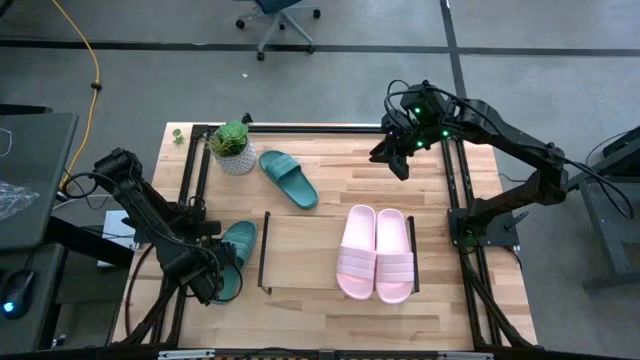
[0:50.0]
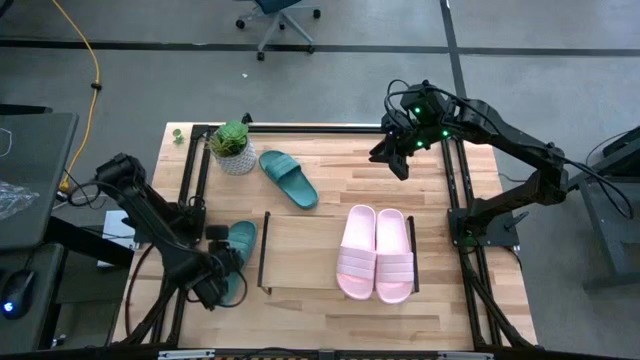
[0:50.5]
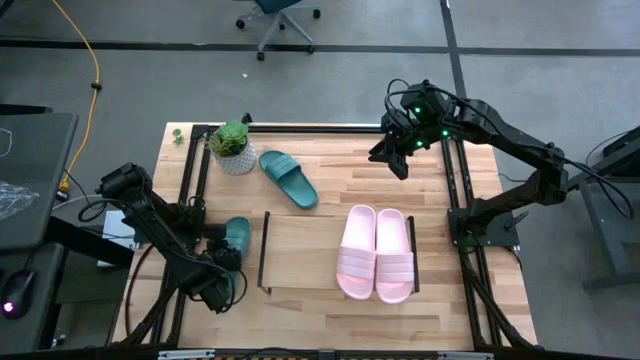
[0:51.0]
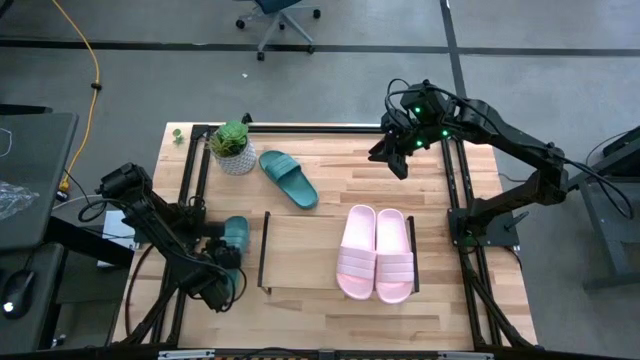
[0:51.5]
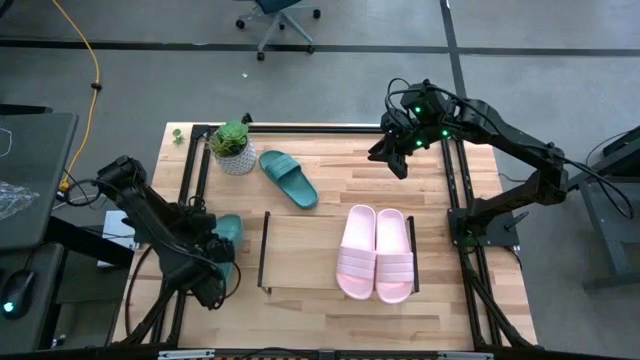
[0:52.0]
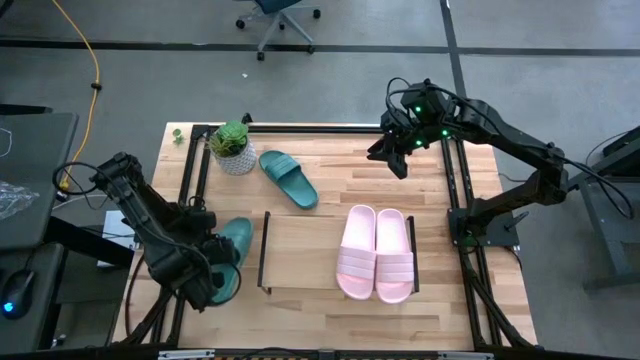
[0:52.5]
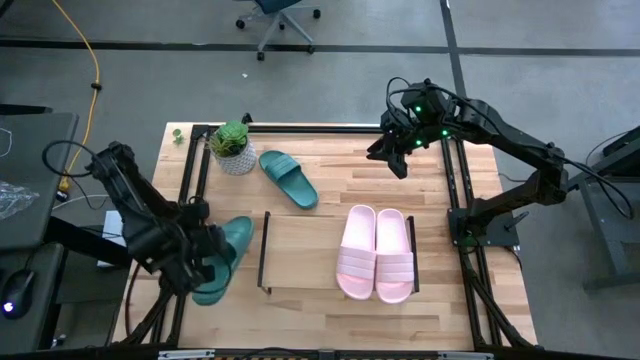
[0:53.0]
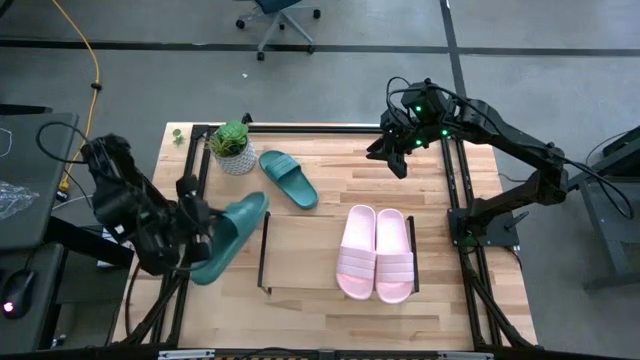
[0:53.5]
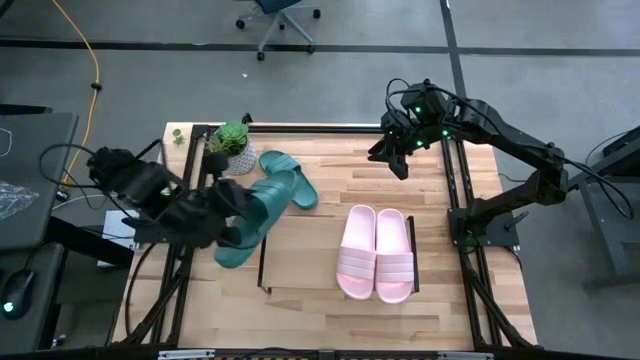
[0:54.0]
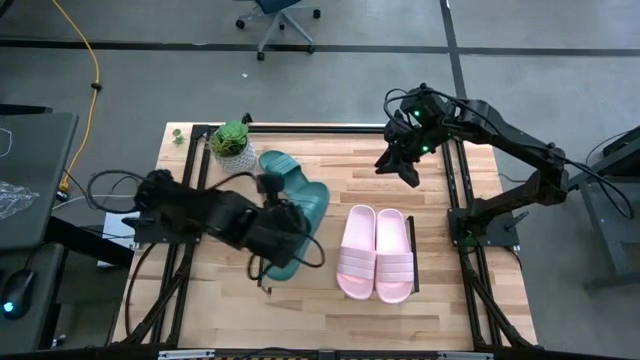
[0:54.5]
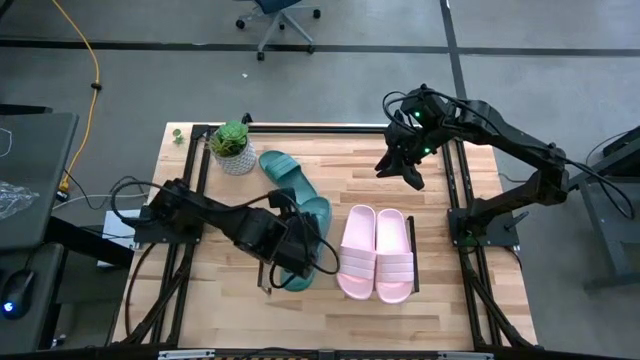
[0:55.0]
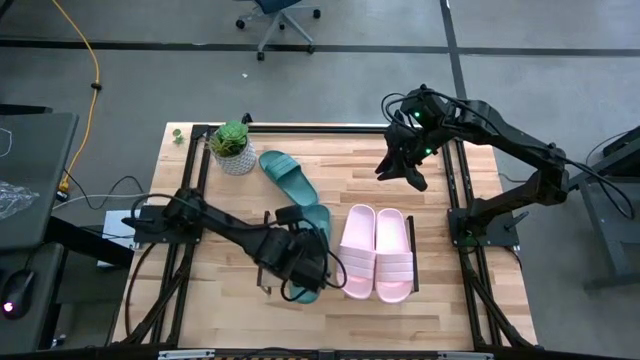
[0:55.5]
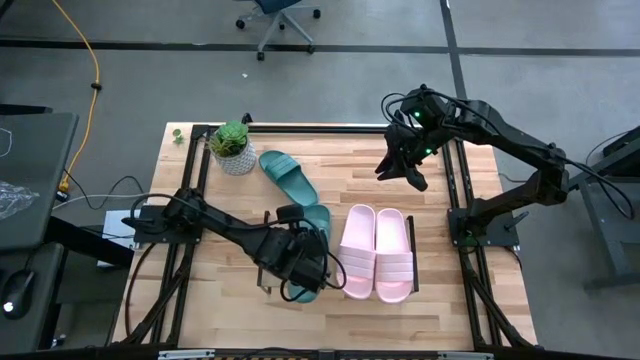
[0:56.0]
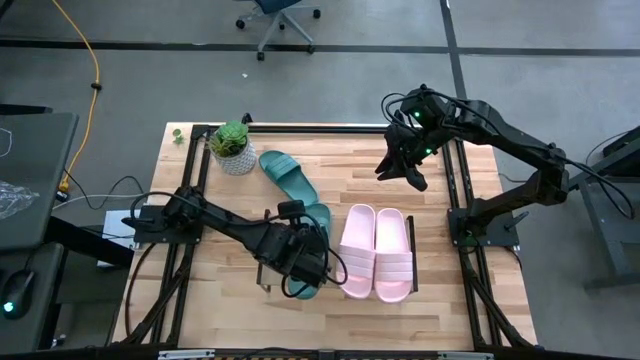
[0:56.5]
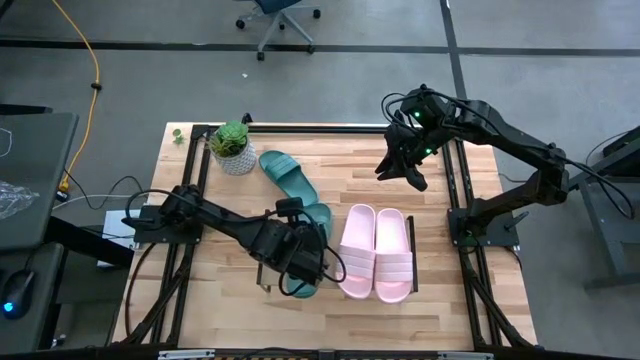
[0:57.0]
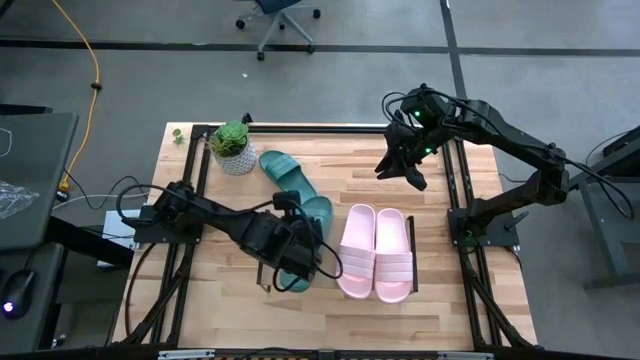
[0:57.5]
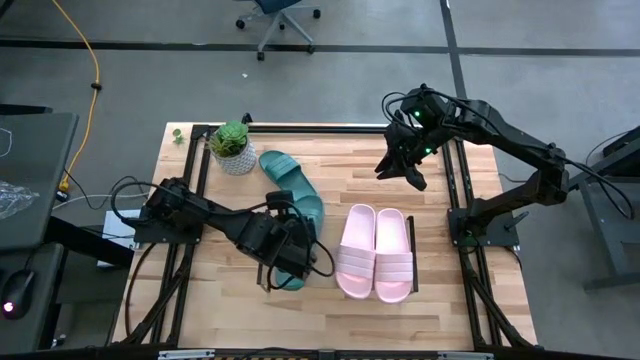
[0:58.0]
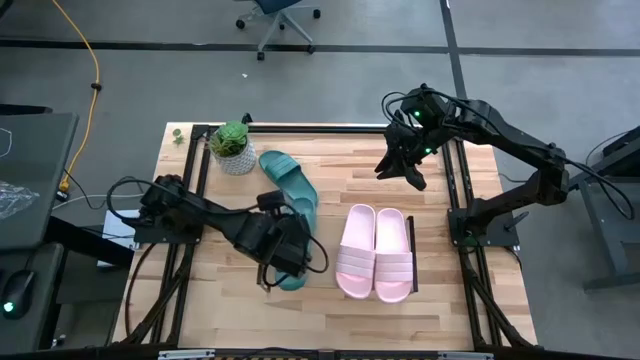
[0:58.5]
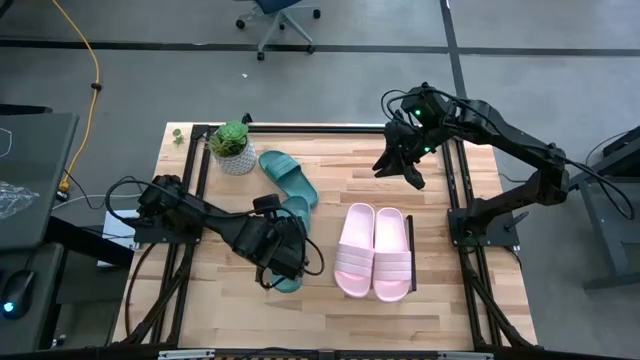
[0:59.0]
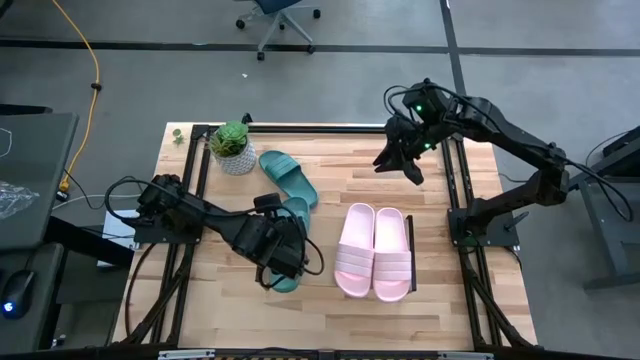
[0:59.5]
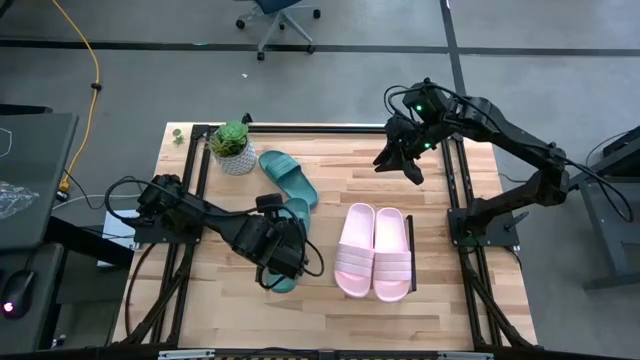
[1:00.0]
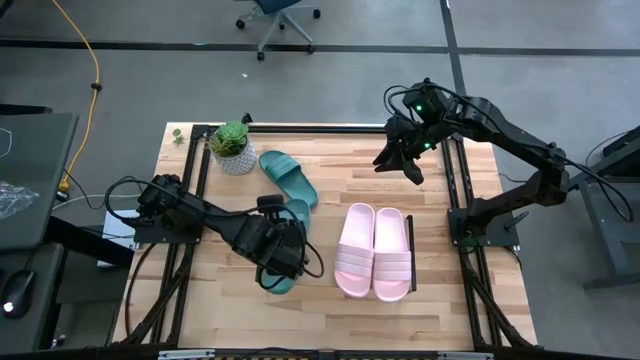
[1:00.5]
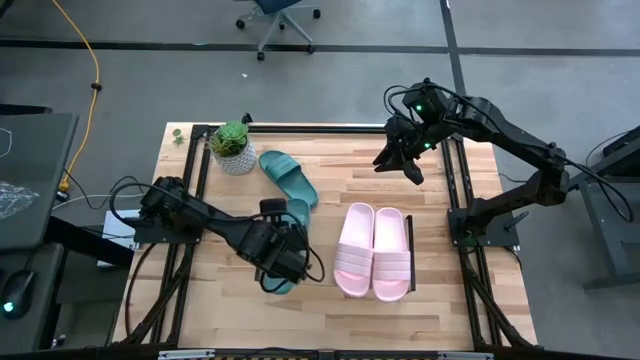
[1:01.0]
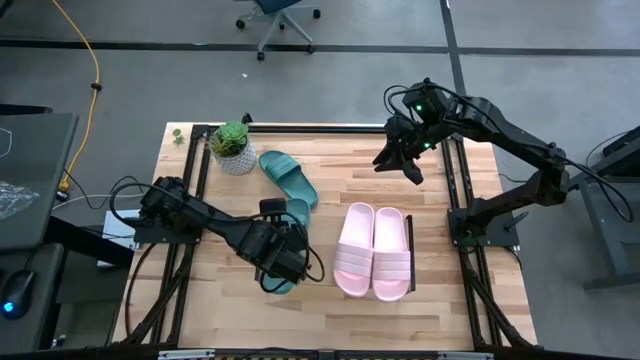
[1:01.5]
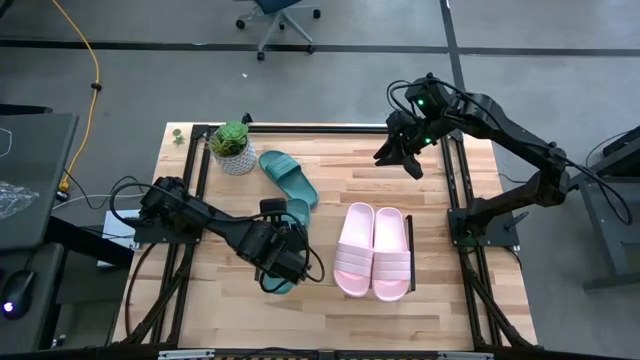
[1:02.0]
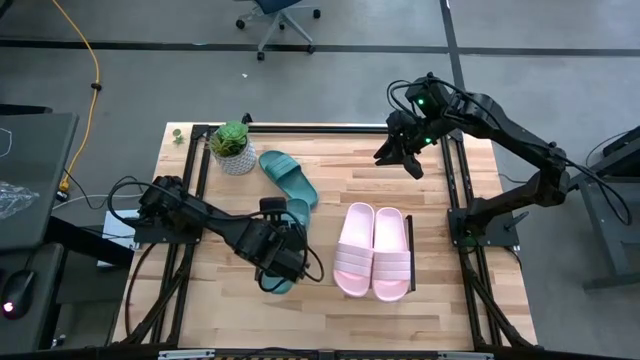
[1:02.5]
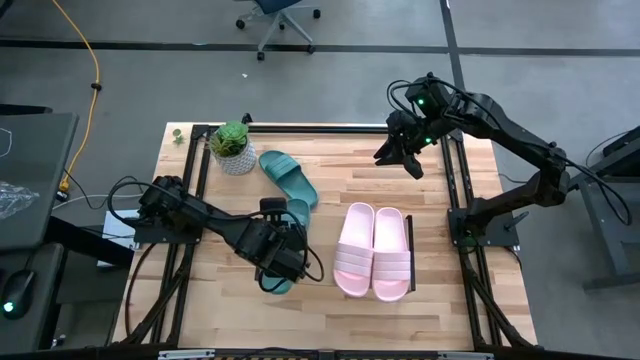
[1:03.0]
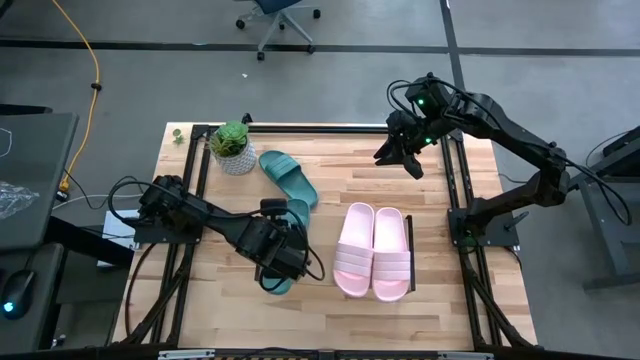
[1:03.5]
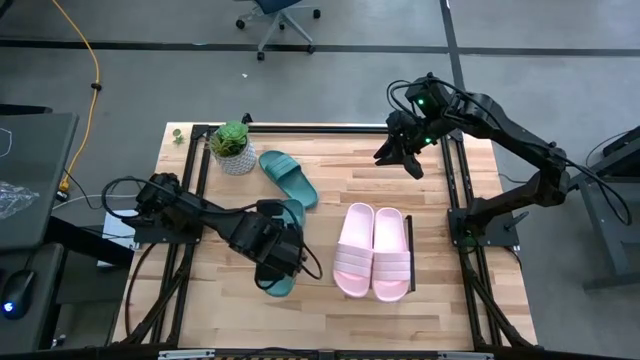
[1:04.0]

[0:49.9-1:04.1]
Task: Pick and place slides into the shelf
Put the bottom green slide on the shelf

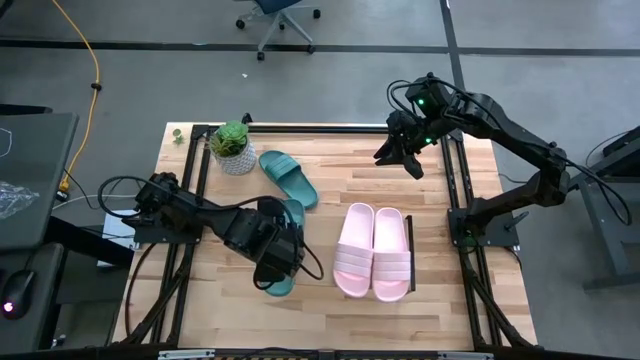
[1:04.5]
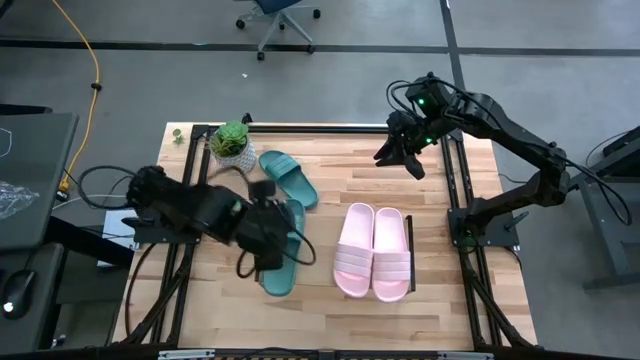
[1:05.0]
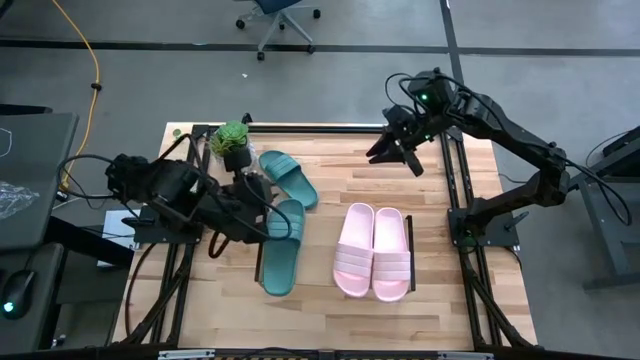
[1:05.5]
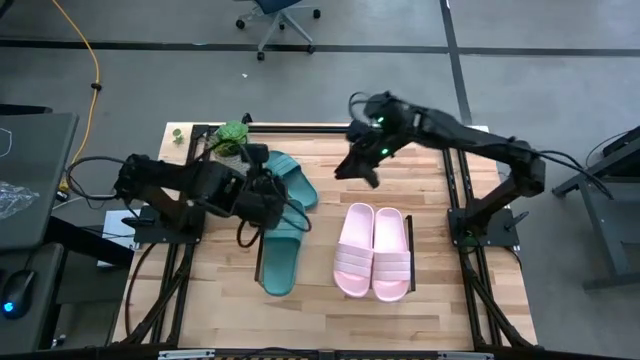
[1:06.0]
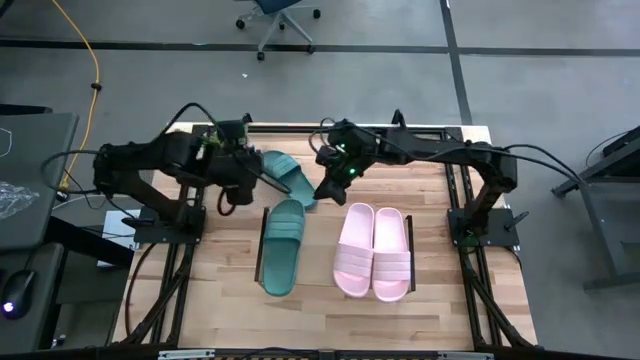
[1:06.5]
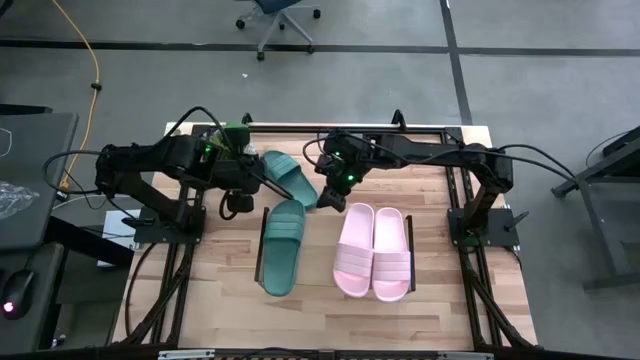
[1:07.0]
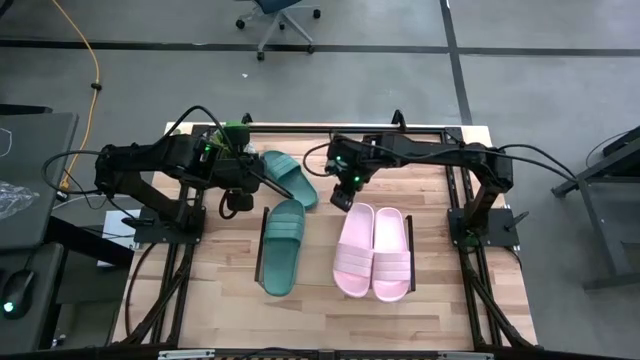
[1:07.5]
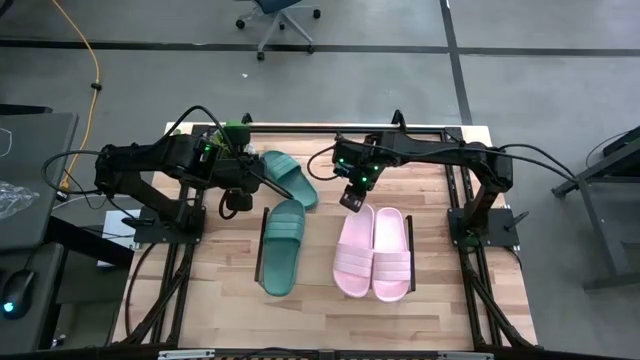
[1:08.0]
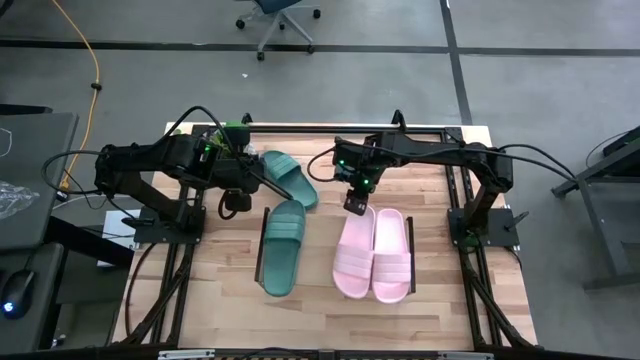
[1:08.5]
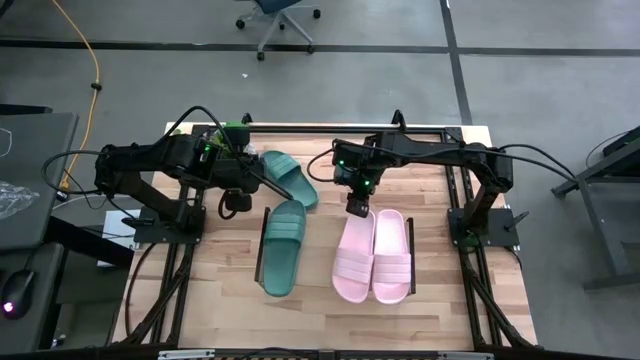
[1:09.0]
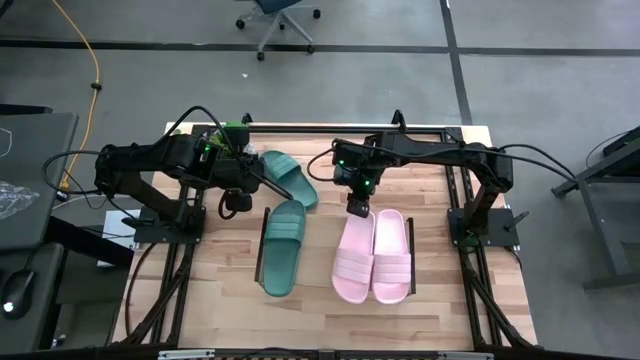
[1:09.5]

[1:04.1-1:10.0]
Adjust the left pink slide on the shelf

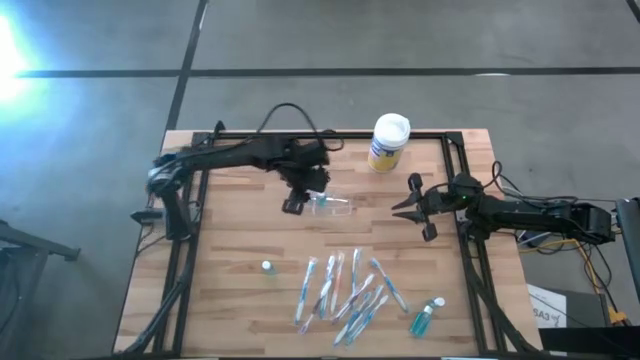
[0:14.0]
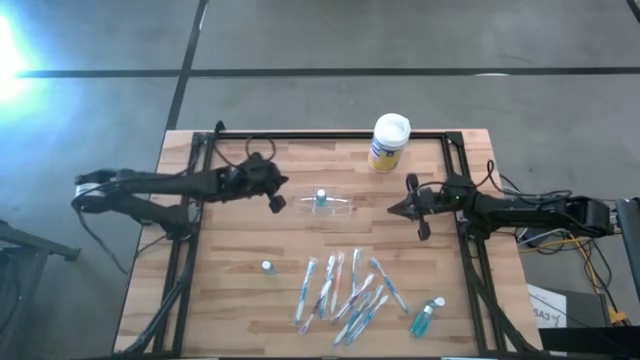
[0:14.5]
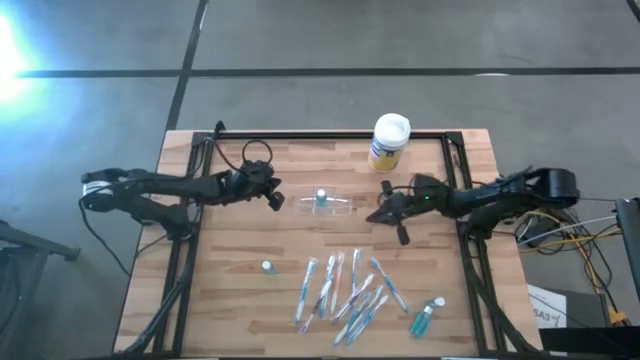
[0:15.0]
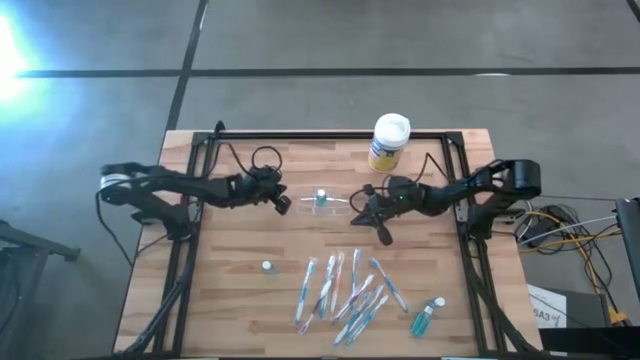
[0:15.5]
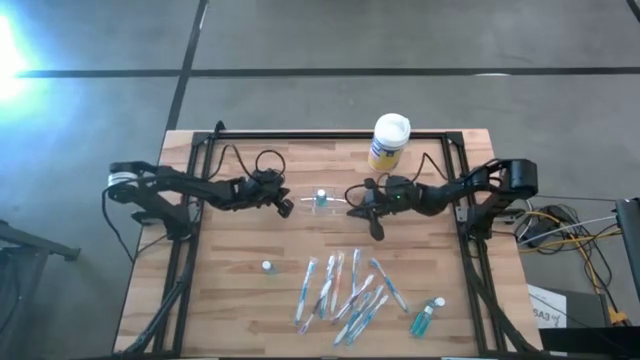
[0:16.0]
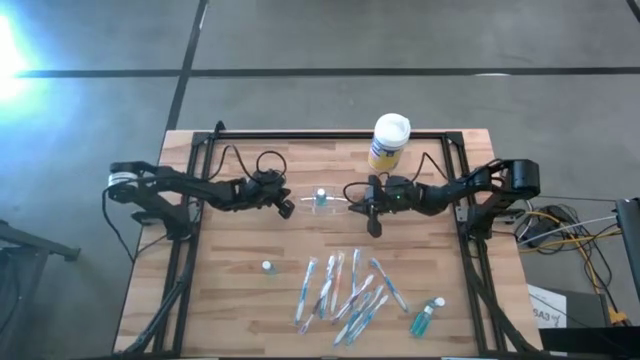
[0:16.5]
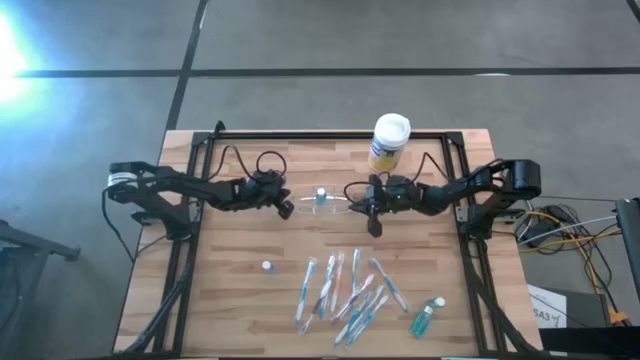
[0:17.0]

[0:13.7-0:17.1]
Task: Pick & Place toothbrushing station
Adjust the transparent organizer
